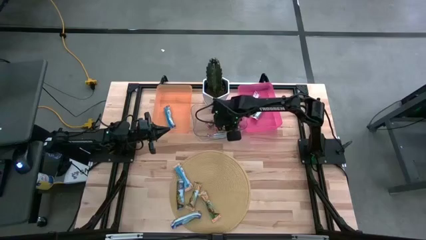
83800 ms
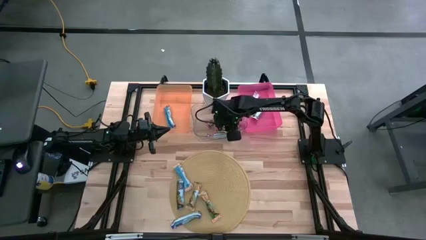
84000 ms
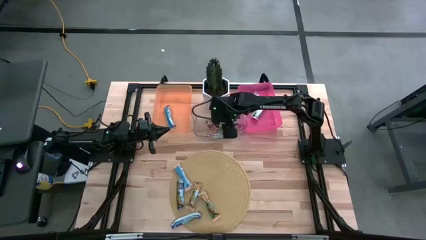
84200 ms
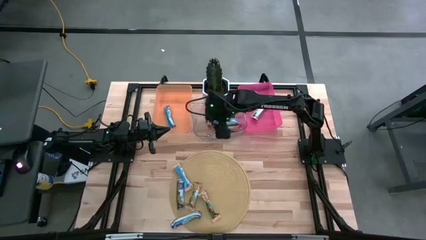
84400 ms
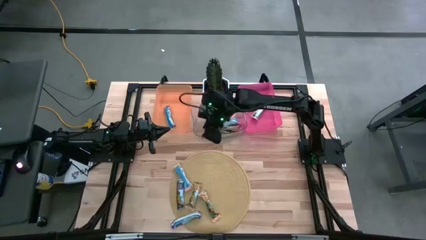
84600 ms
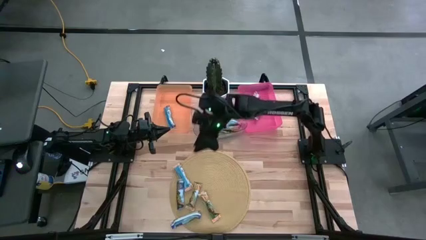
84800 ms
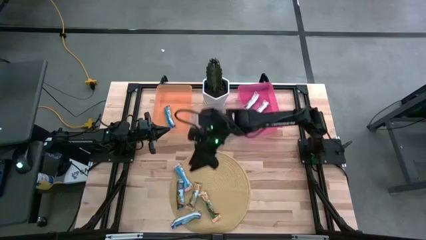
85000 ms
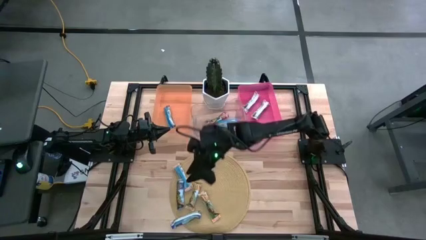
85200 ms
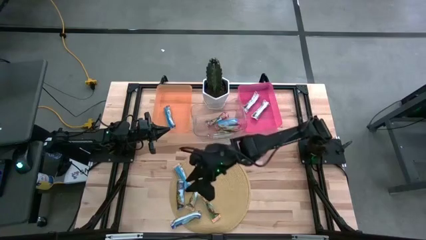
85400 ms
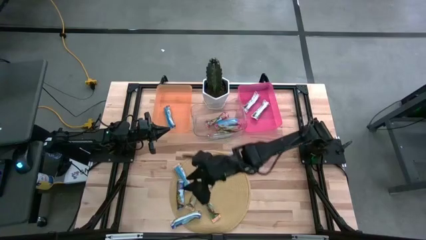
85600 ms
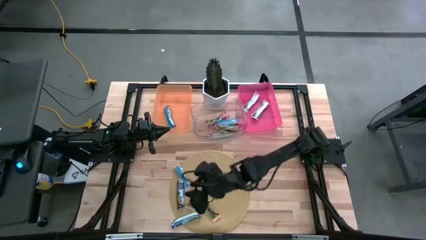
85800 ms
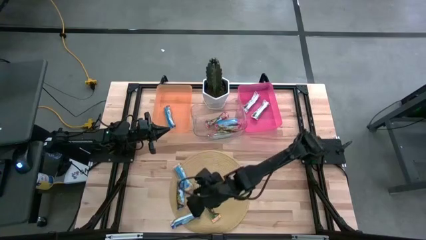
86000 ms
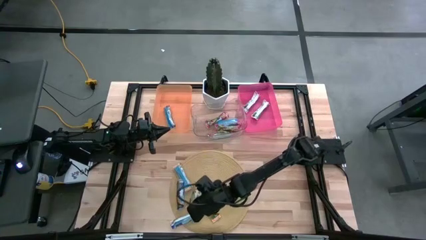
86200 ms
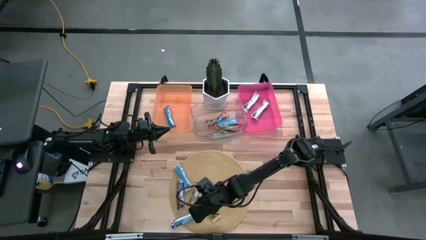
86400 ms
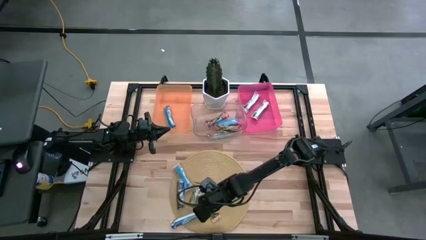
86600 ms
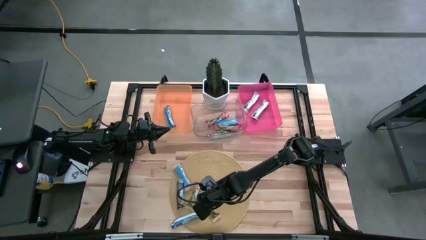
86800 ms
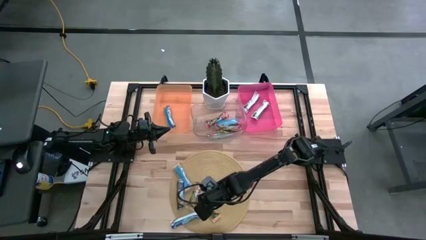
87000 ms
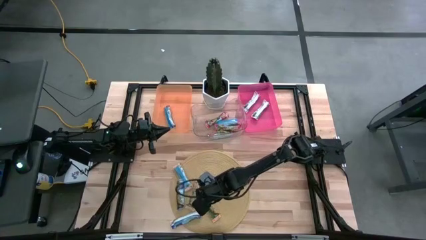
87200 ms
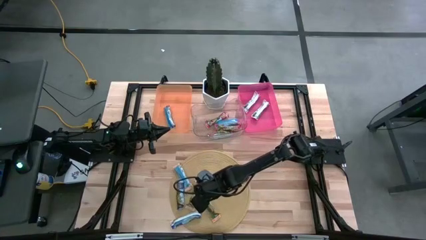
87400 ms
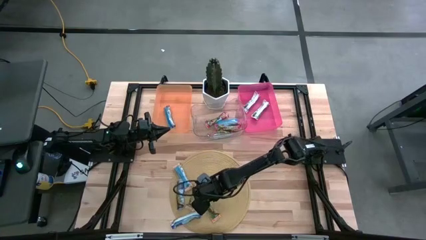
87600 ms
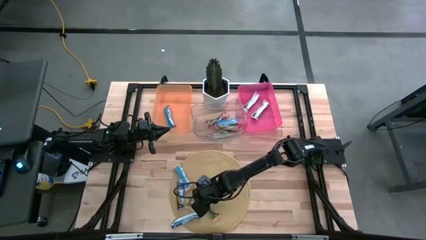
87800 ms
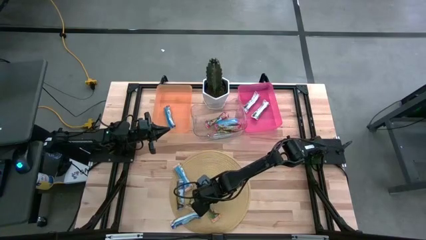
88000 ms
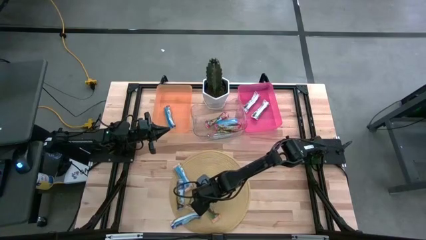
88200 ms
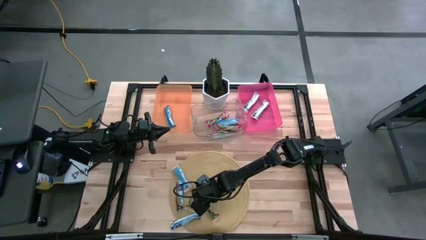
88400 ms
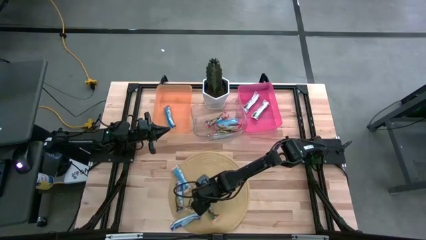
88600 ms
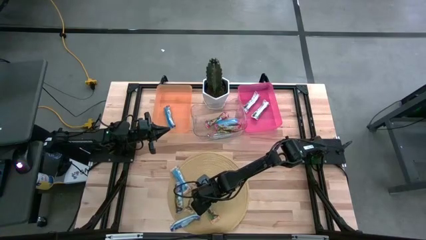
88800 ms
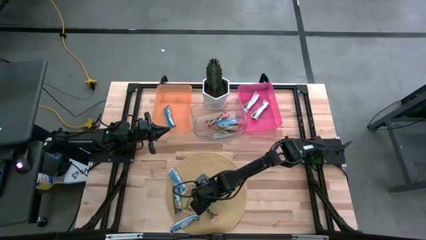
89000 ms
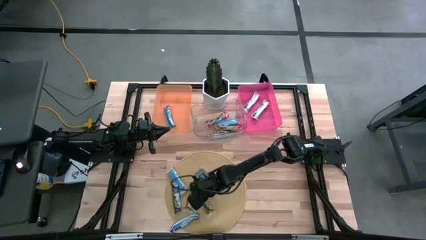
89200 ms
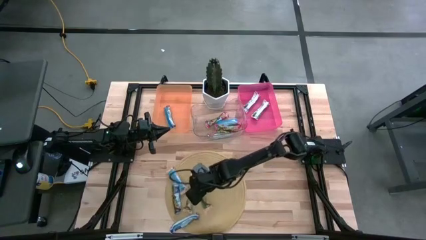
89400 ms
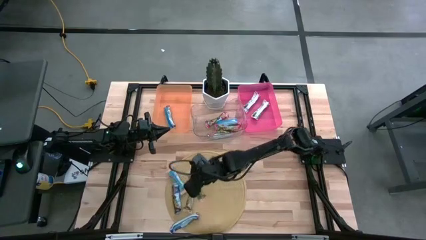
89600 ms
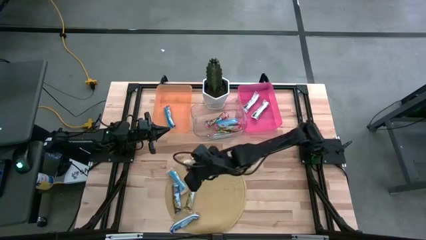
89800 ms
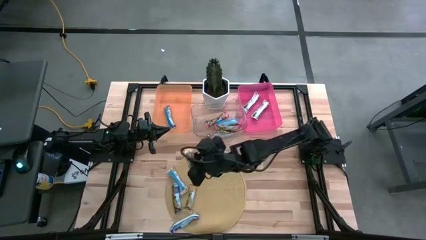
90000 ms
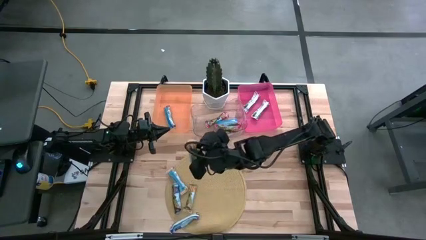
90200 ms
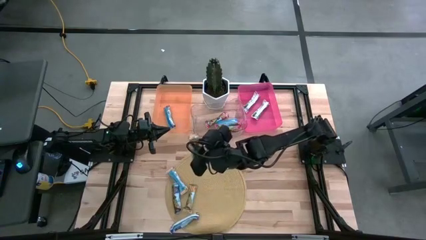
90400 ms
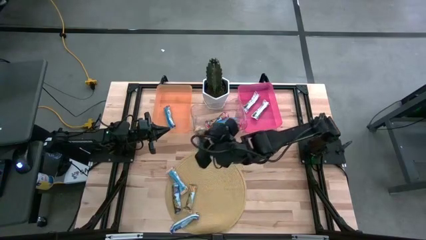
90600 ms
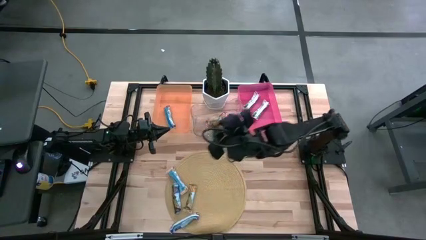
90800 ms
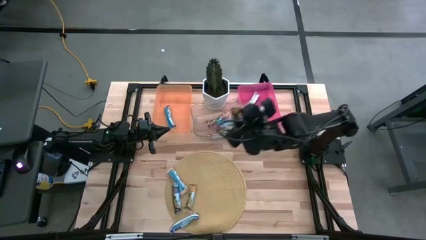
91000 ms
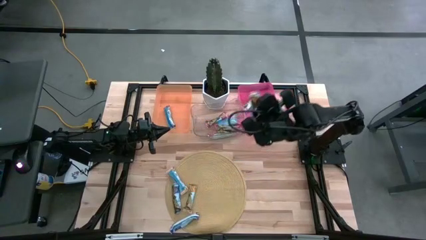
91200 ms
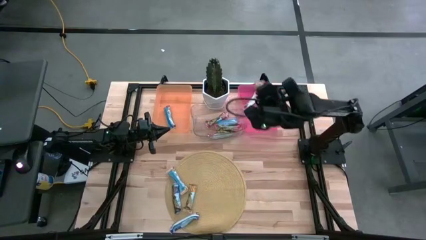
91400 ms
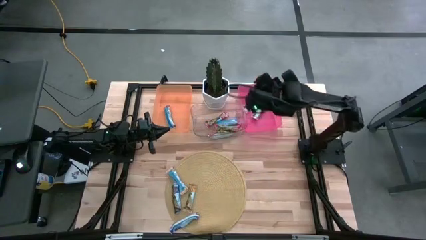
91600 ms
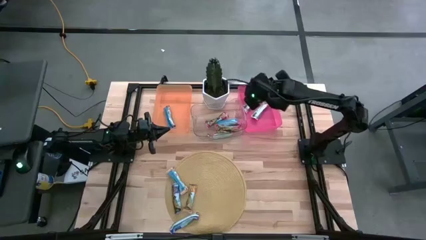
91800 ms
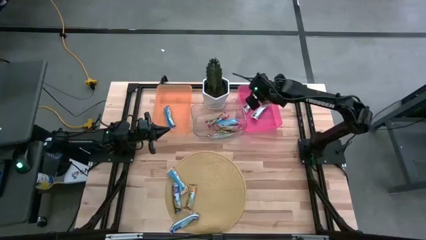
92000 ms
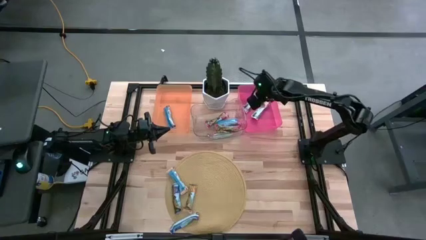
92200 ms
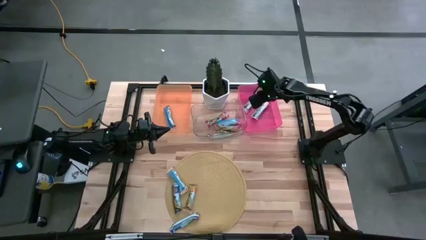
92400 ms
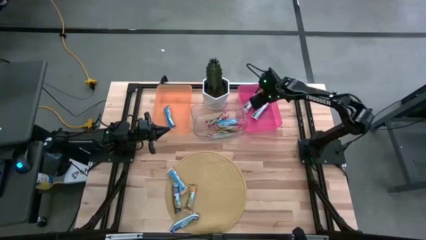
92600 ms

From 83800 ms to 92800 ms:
Task: Pick and place Granola Bars by type
Put the yellow granola bar into the red bin

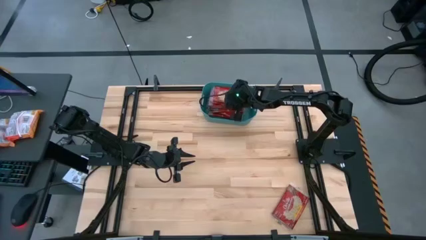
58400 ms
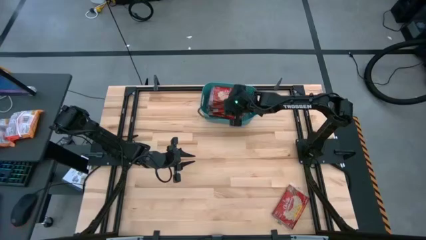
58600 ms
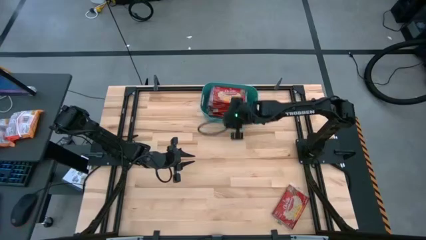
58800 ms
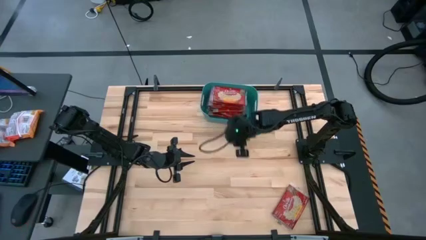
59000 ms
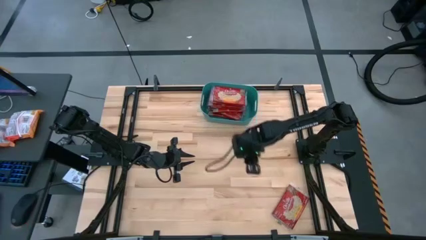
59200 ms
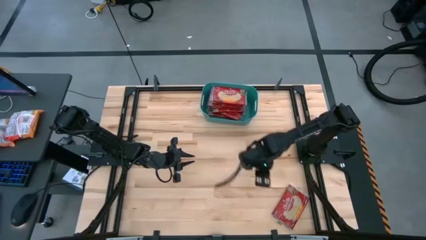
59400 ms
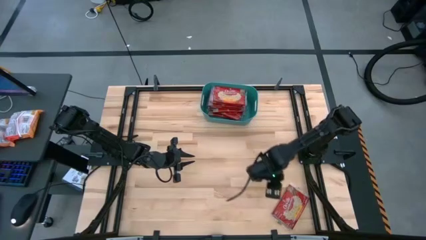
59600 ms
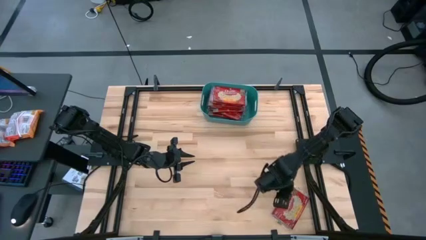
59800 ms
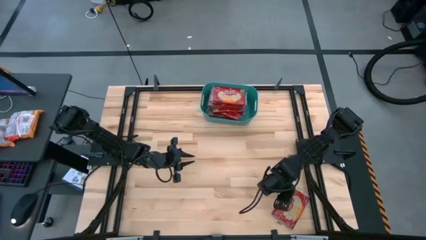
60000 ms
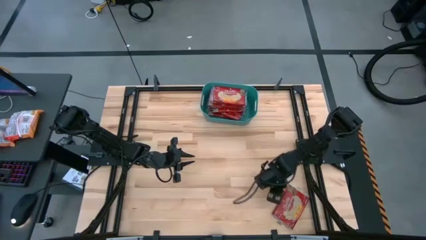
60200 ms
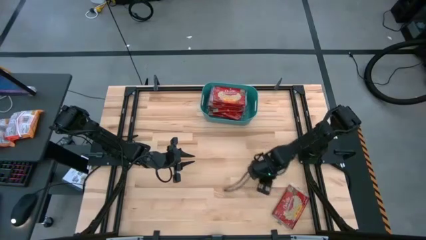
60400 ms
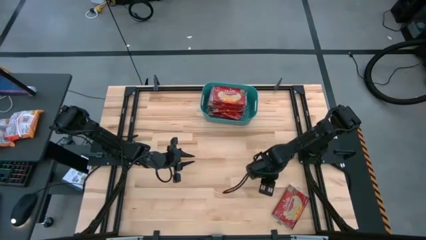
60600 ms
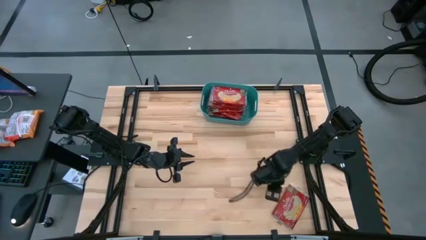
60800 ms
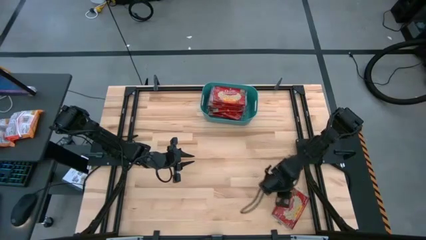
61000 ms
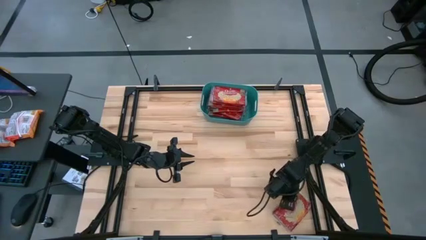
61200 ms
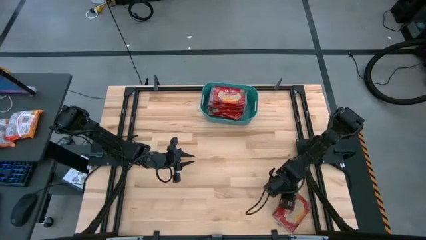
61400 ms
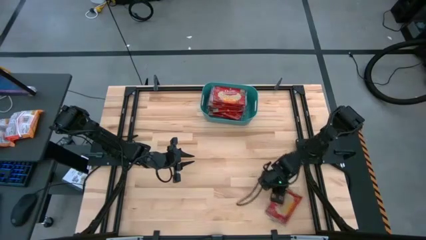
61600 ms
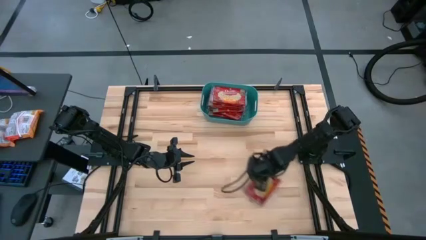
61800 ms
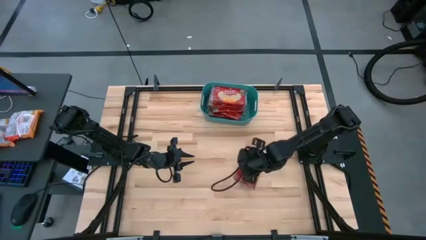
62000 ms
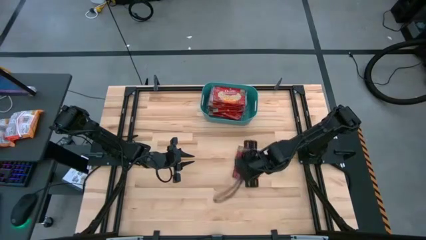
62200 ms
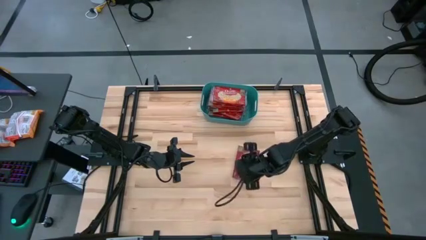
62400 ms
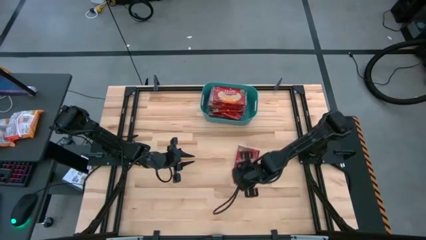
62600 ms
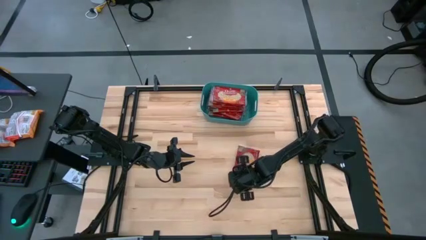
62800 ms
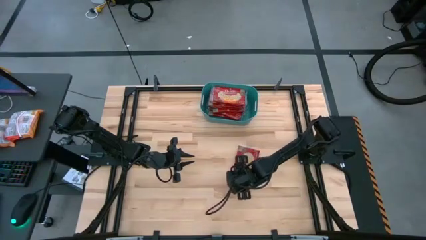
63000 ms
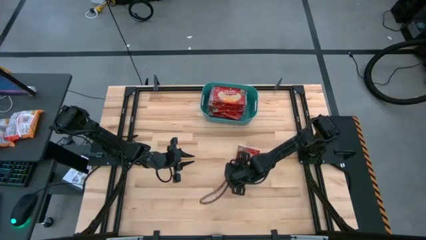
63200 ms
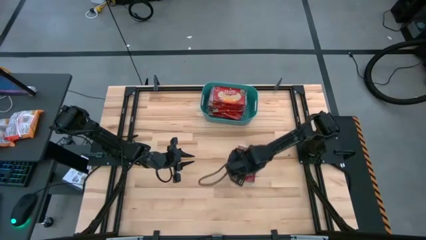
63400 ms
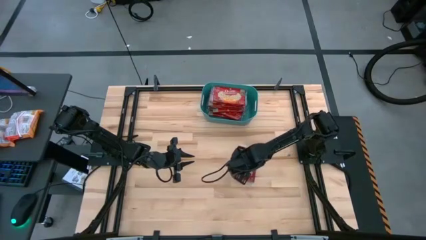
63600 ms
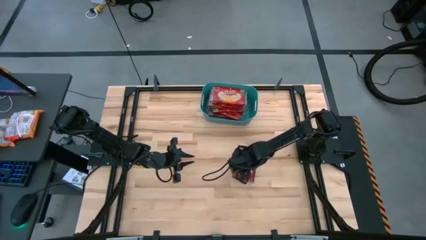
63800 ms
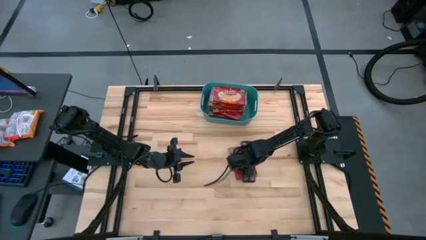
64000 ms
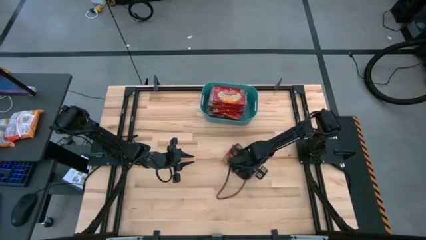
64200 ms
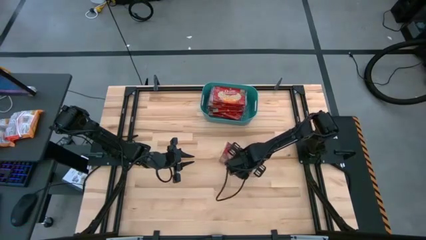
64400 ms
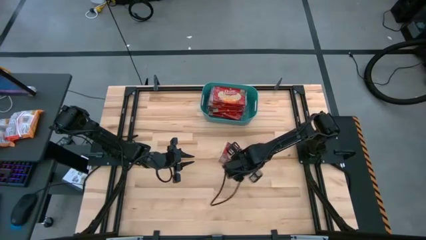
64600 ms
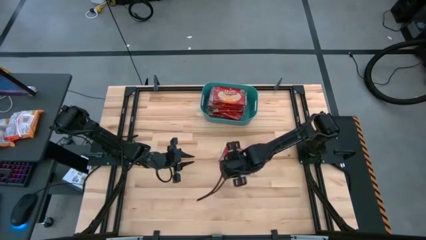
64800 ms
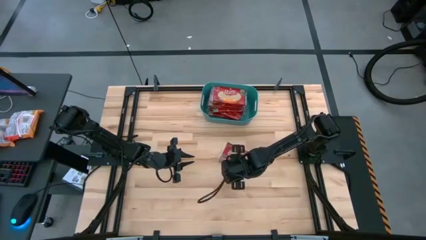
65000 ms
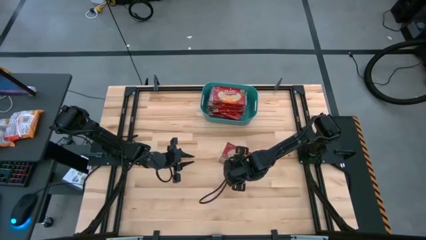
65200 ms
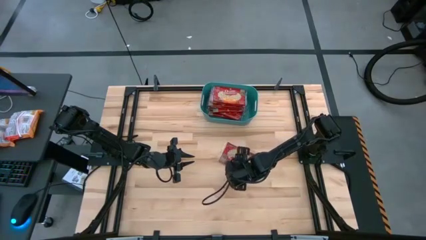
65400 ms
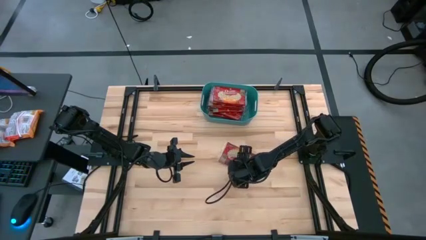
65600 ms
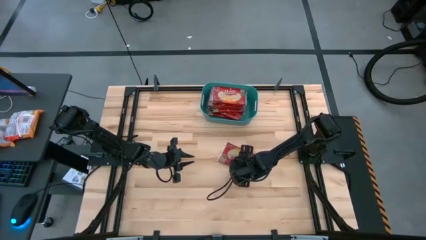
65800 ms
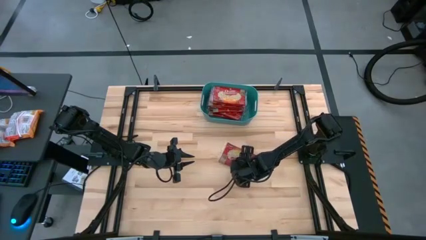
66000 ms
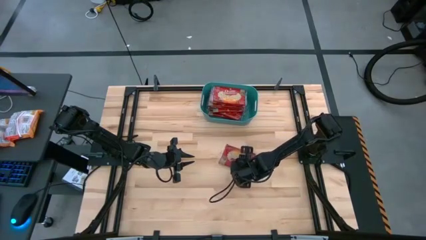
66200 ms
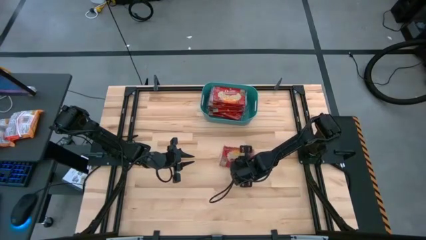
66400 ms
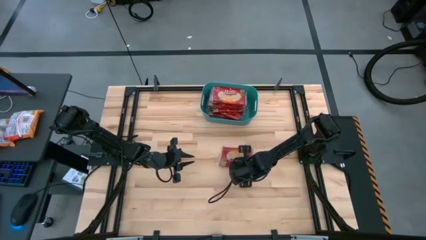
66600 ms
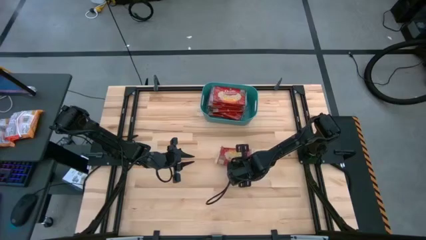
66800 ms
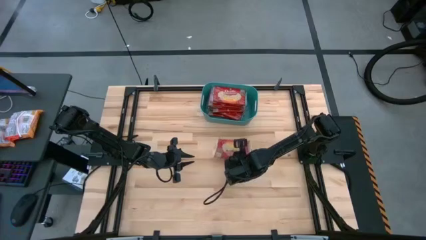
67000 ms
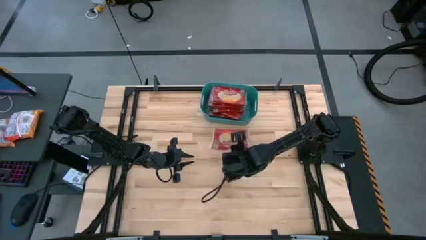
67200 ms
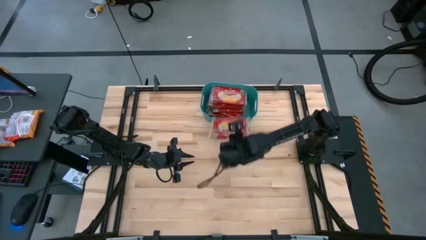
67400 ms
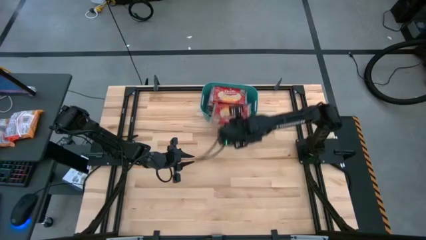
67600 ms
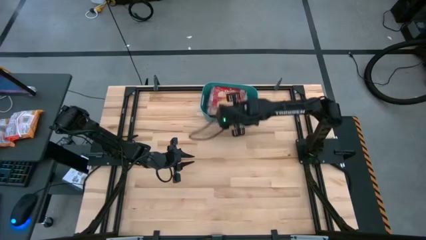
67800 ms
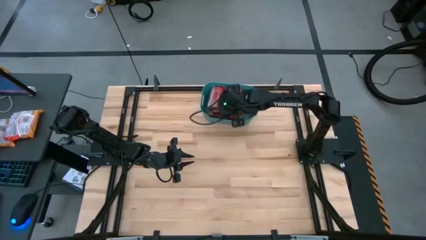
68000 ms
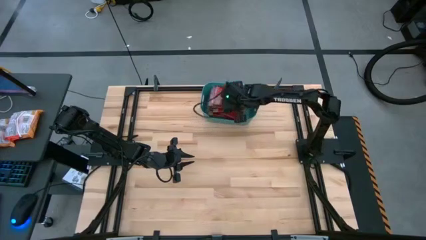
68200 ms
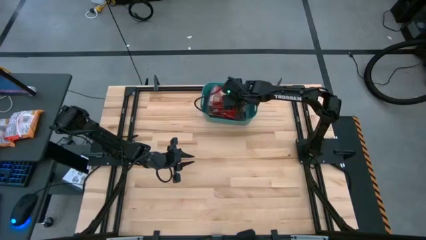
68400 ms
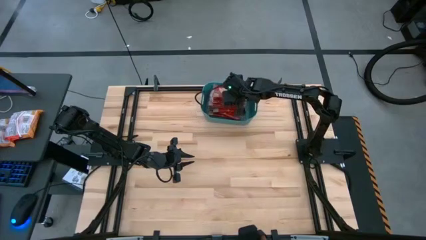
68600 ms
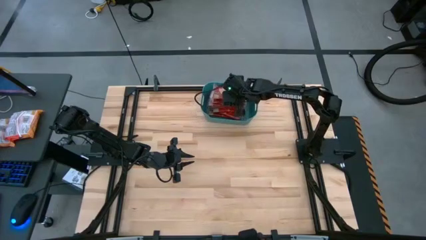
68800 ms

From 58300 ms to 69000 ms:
Task: Sort popcorn bags into baskets
Put the red popcorn bag into the blue bin
